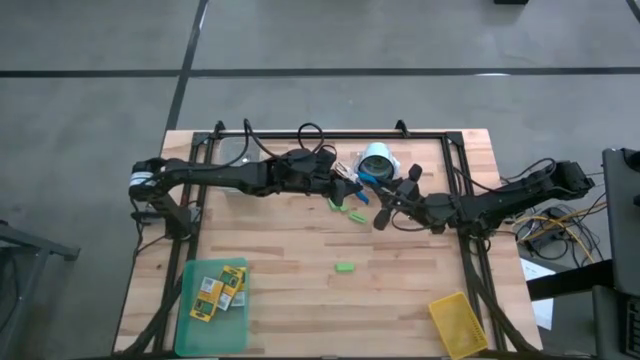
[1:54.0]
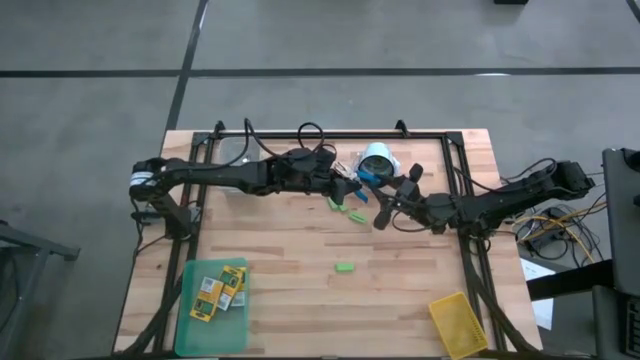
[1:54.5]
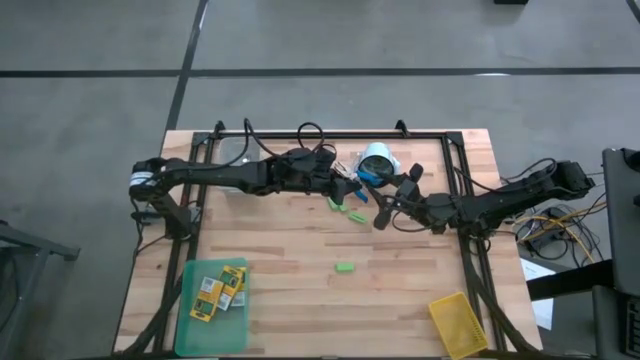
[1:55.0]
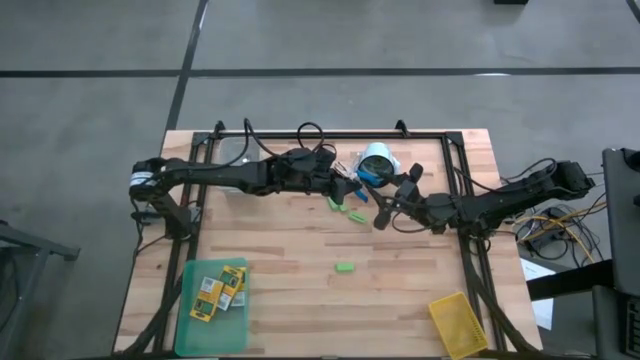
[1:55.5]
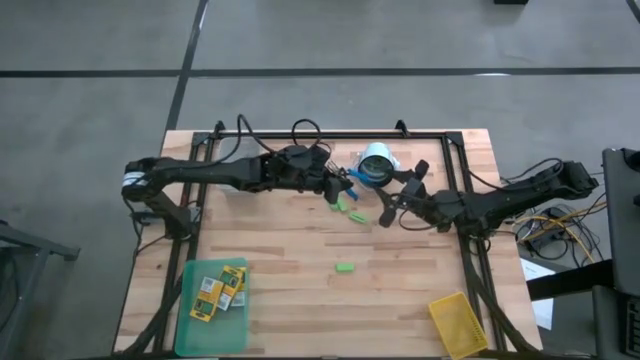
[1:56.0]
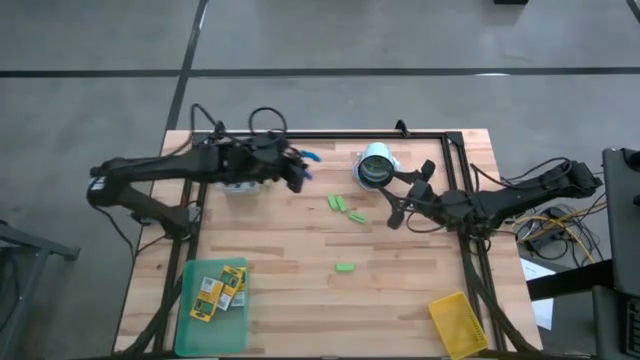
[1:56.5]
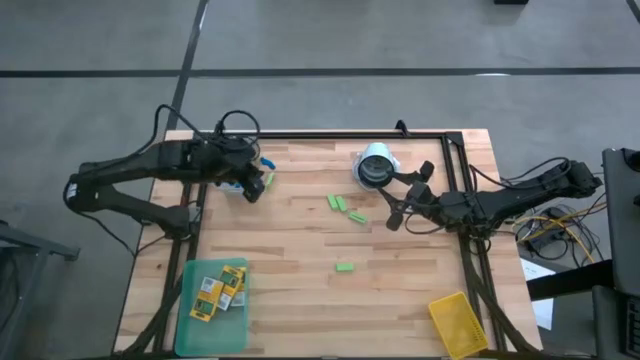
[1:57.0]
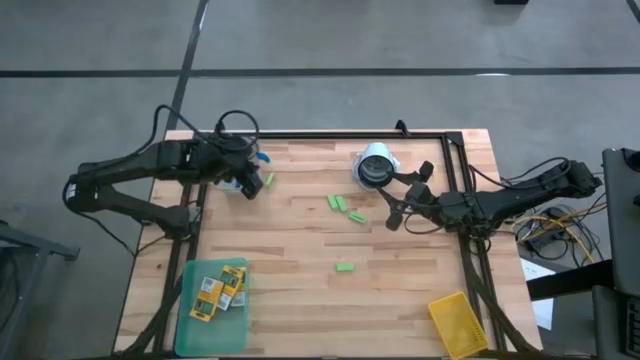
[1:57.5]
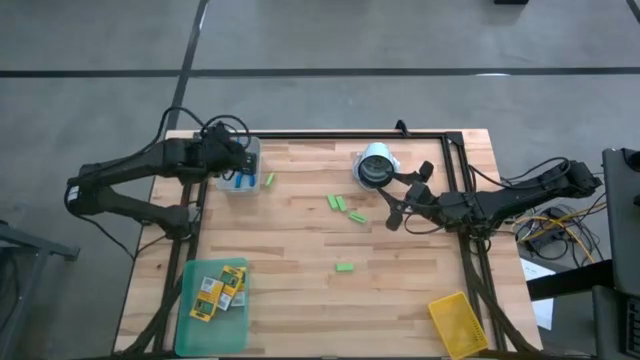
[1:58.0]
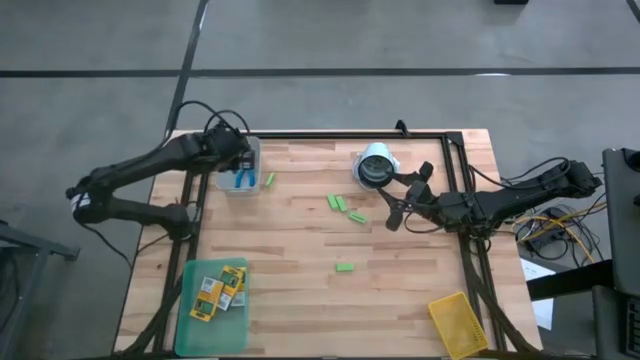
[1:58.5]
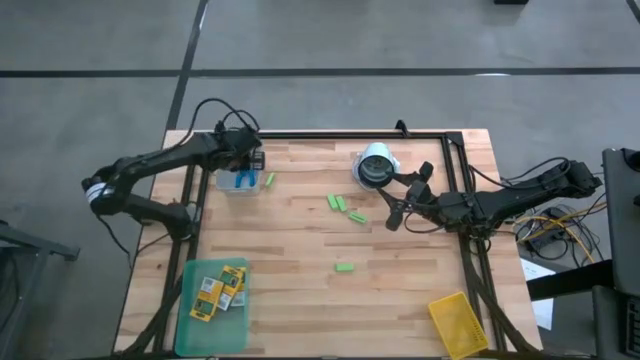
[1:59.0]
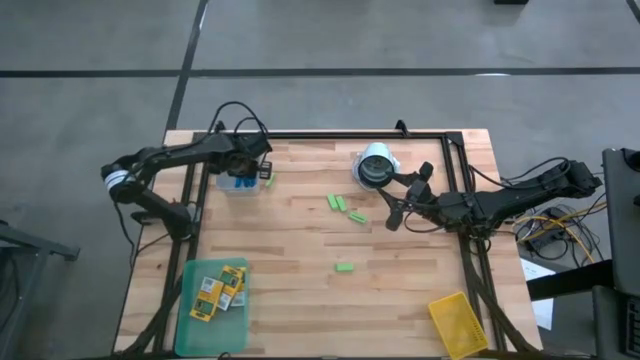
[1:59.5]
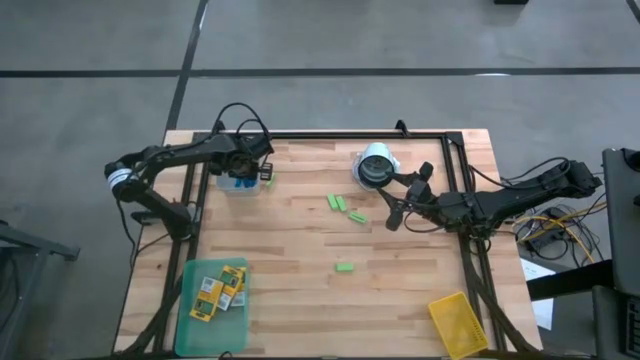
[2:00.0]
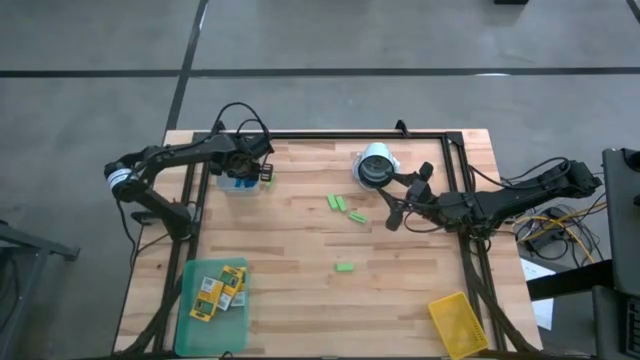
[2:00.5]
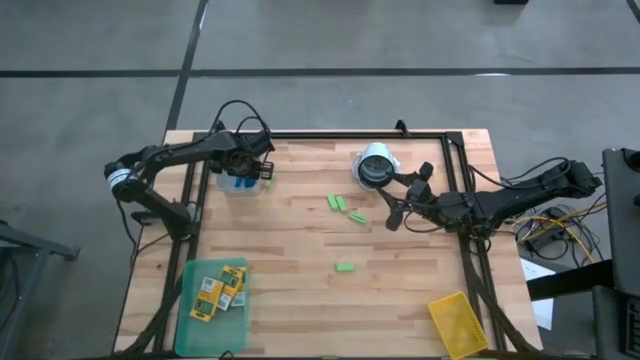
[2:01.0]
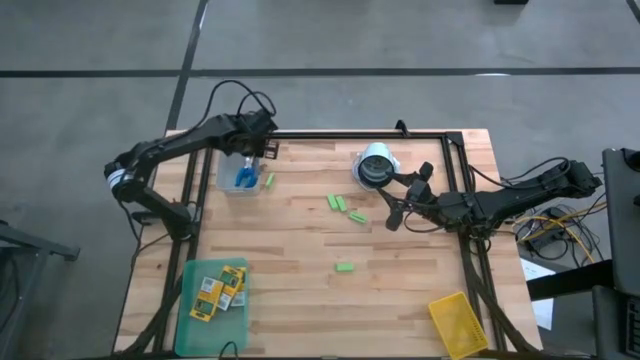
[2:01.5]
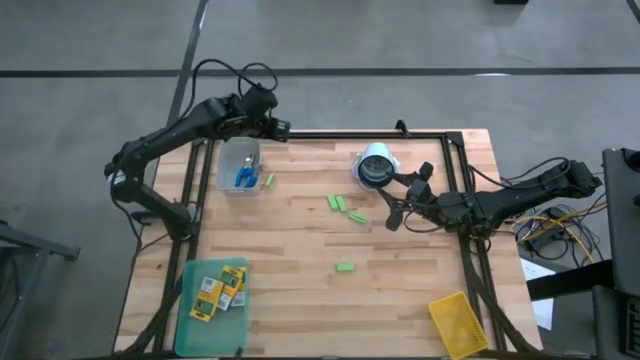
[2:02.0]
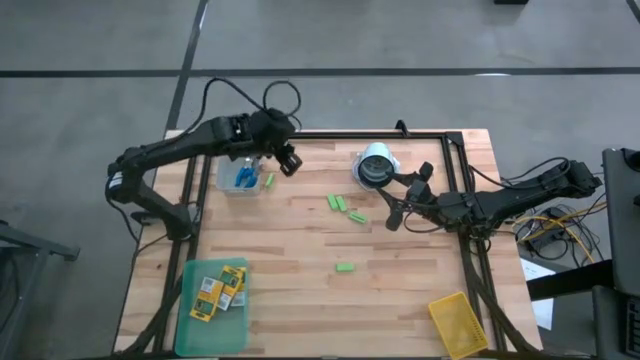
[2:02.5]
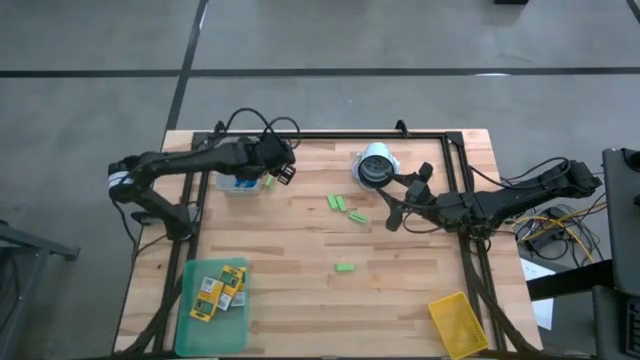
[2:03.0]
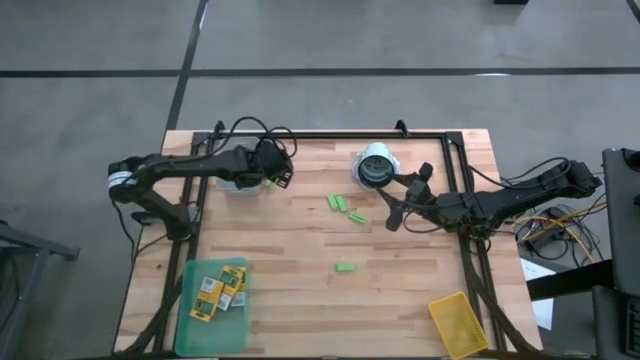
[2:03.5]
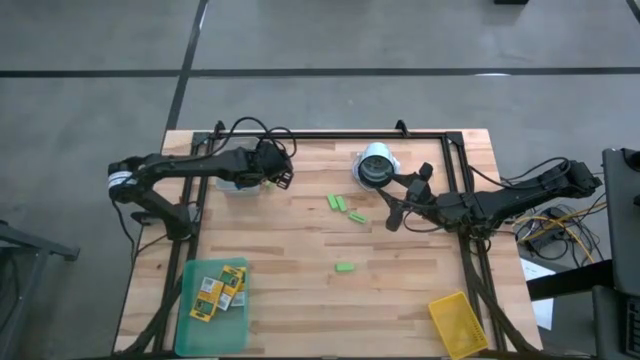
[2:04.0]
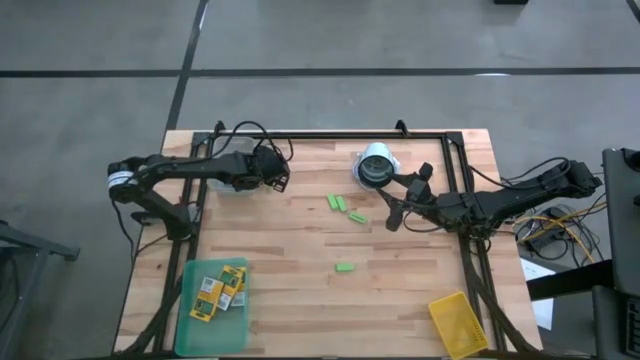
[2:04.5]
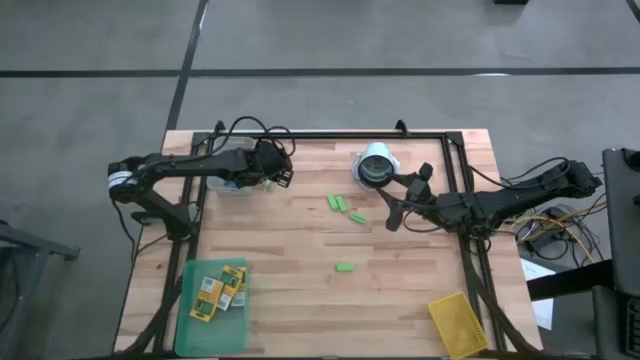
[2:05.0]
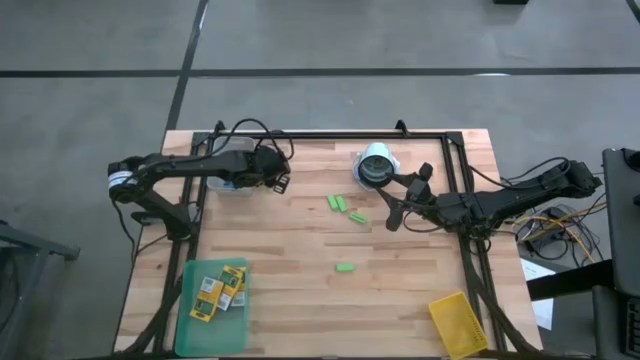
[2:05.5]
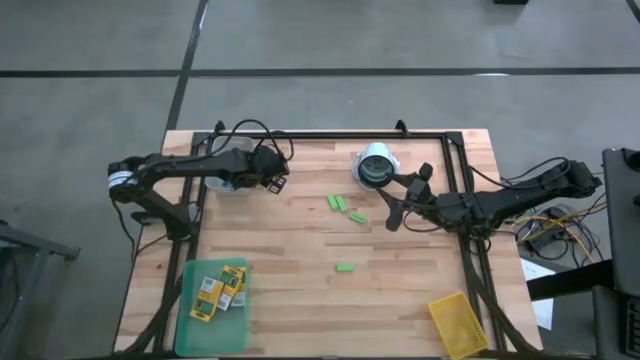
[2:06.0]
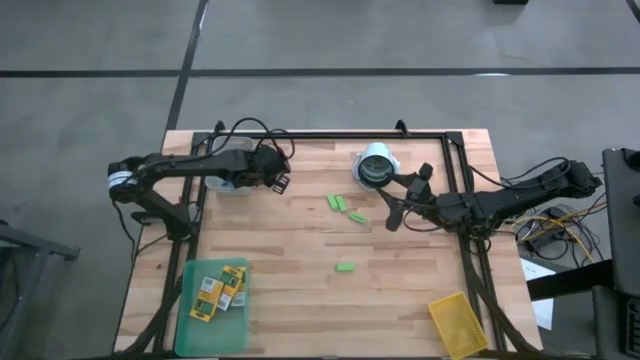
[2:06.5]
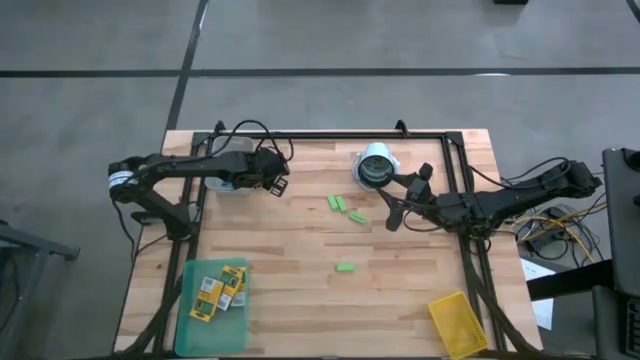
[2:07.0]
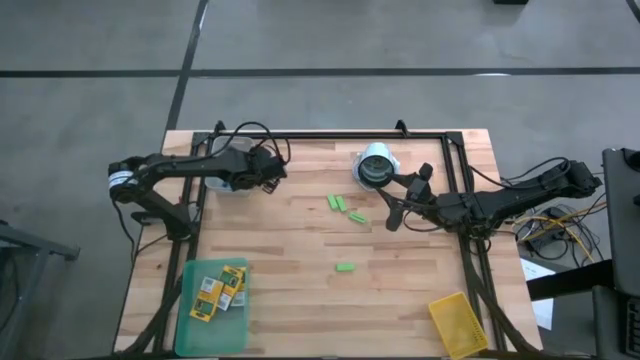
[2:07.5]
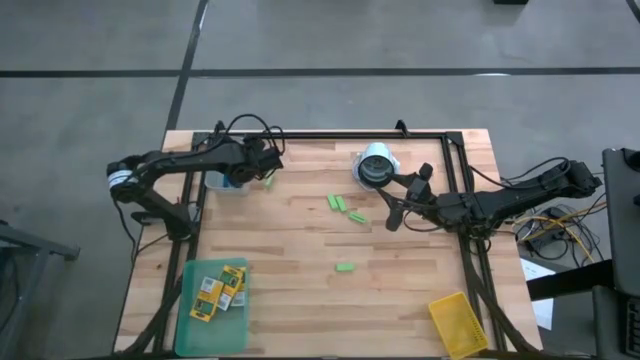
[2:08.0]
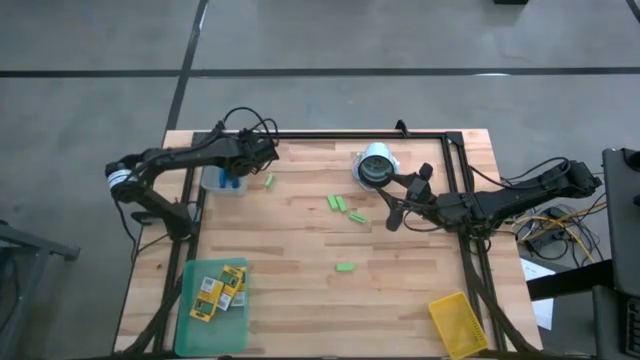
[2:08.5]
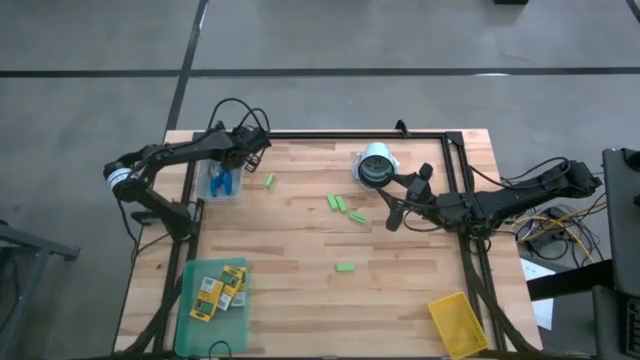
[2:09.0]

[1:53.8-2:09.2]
Task: Pick & Place School Supplies
Put the blue puncher hole into the gray bin

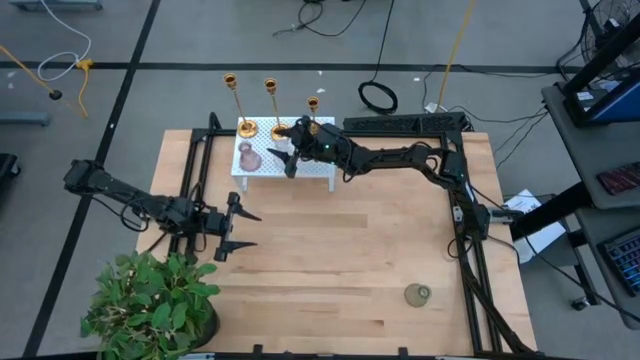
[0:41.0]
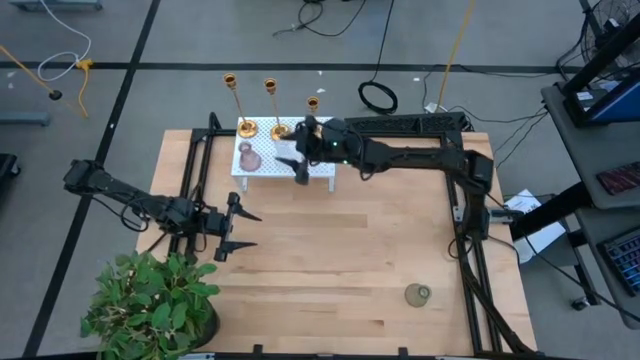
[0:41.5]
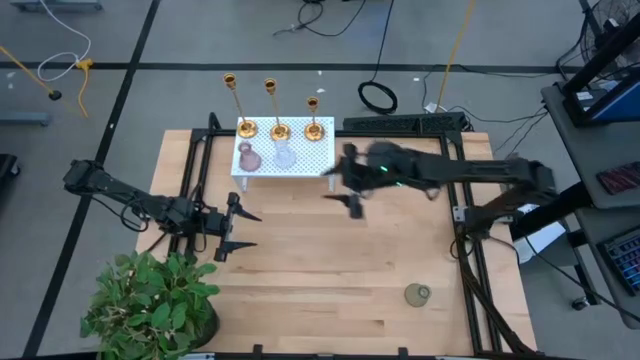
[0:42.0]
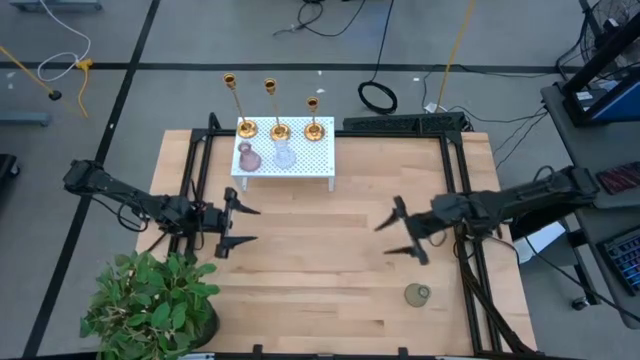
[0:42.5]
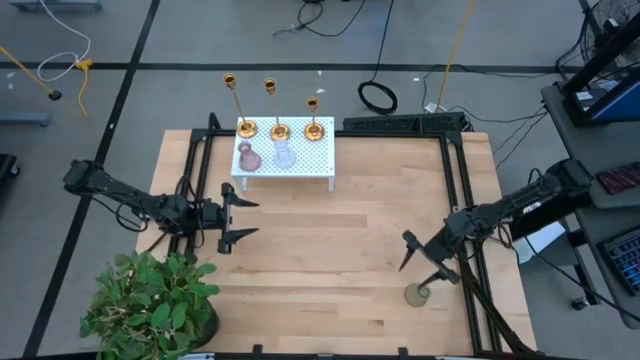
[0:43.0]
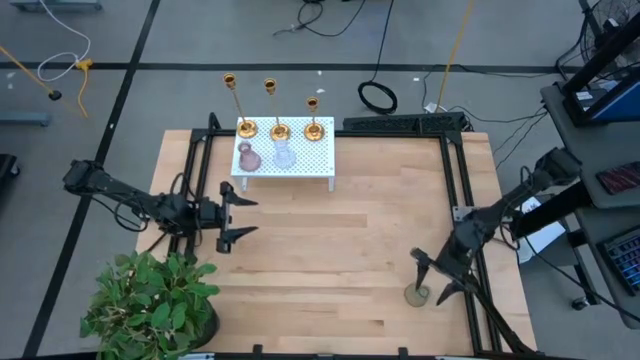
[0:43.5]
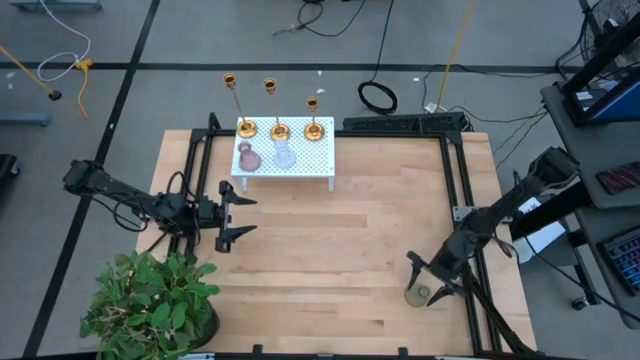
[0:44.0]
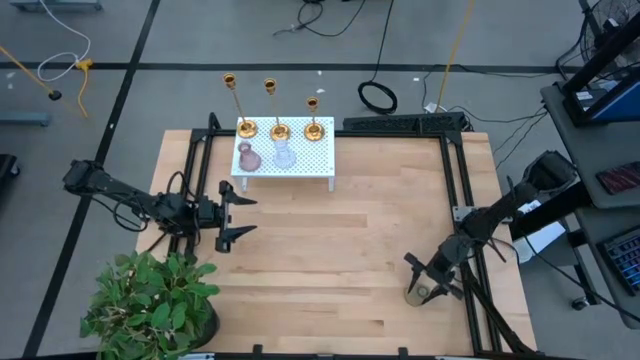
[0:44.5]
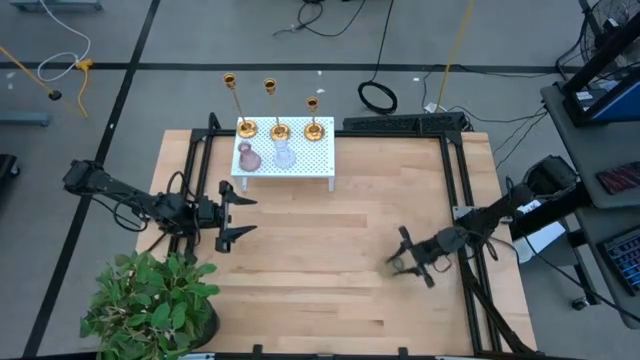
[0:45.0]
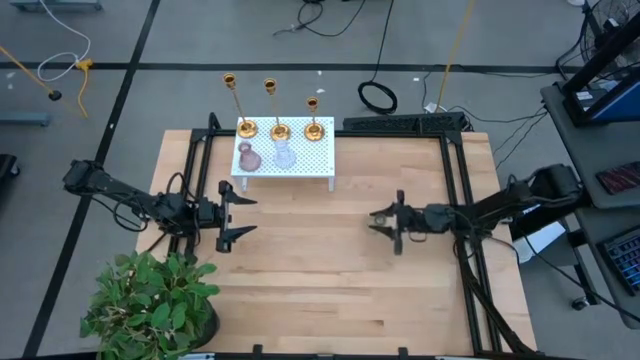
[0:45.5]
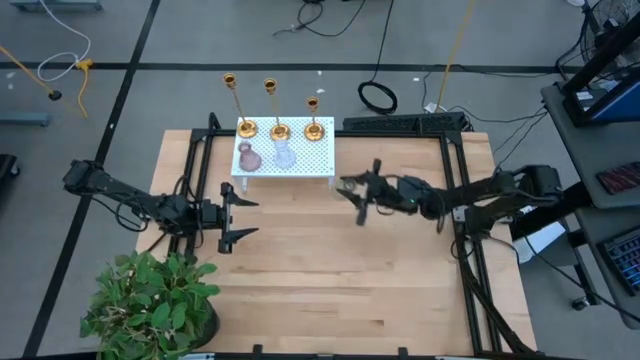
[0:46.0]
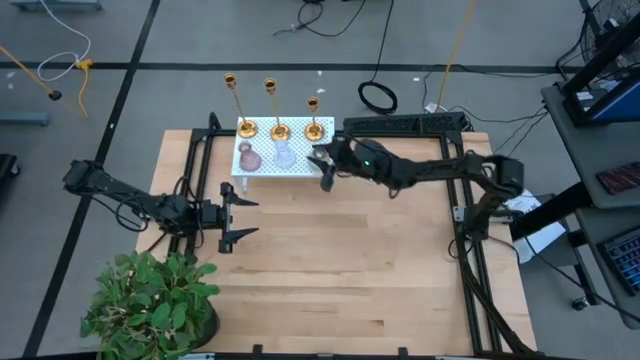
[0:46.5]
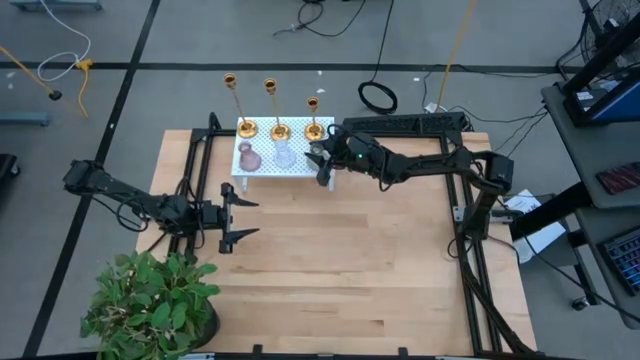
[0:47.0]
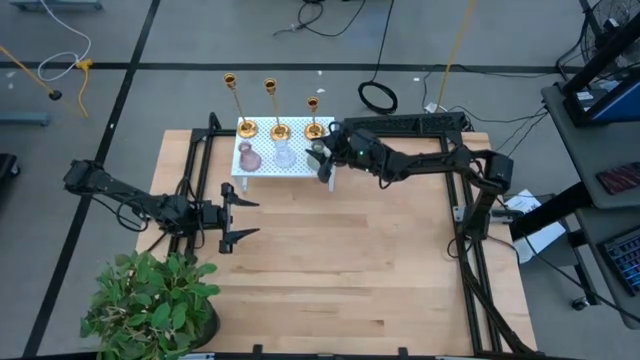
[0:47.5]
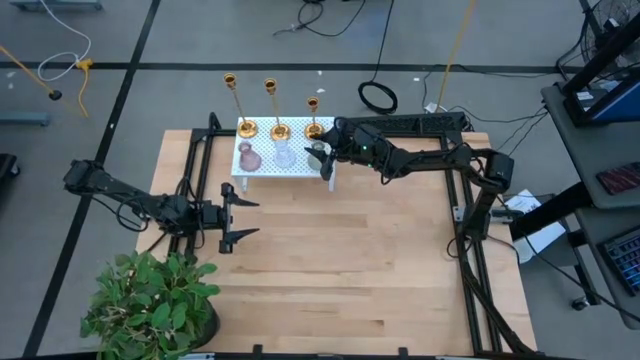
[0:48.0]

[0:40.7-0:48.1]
Task: Pick & Place candle stick holders
Put the green candle holder on the shelf
